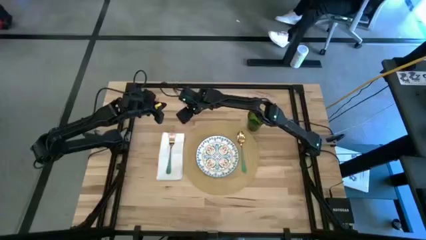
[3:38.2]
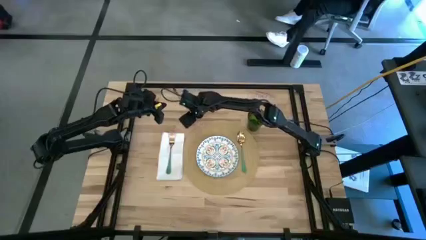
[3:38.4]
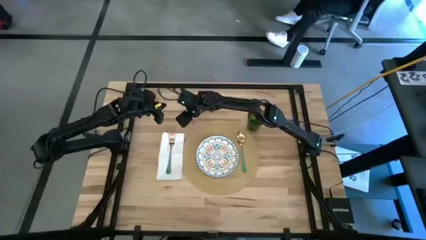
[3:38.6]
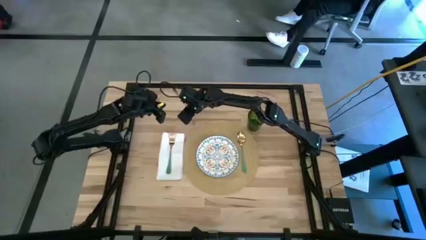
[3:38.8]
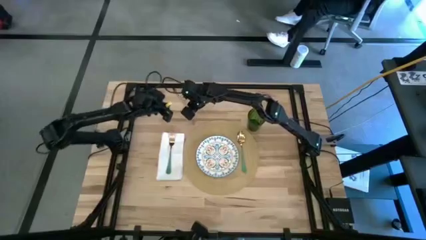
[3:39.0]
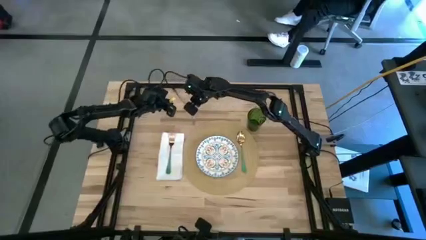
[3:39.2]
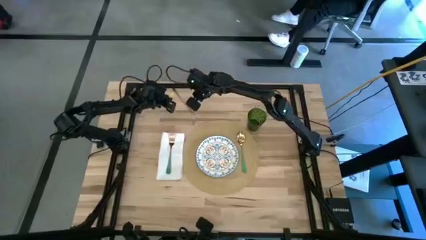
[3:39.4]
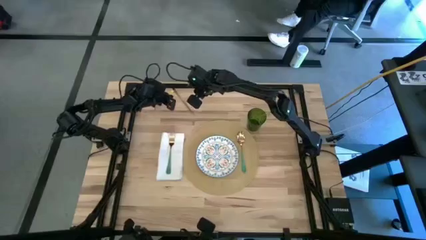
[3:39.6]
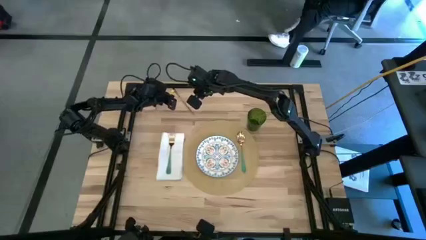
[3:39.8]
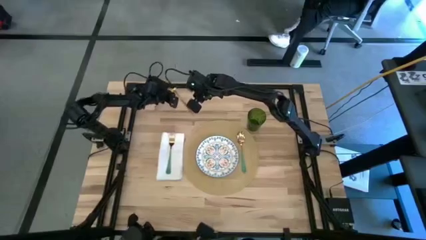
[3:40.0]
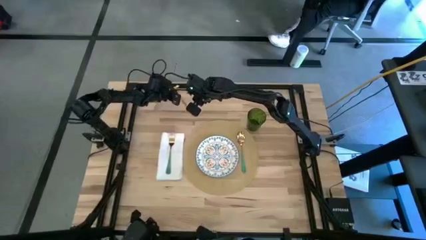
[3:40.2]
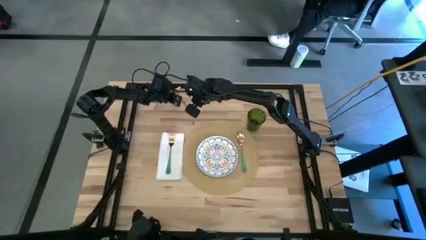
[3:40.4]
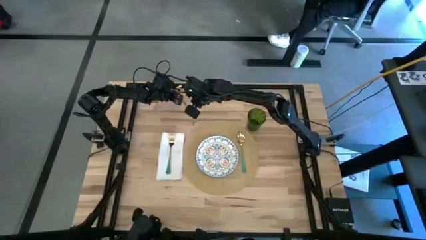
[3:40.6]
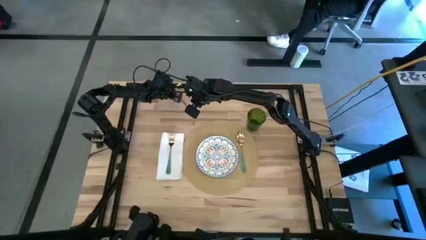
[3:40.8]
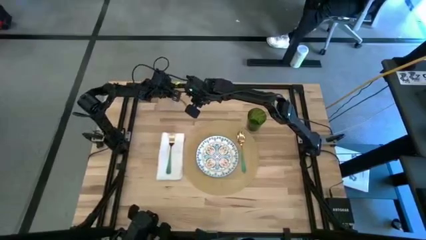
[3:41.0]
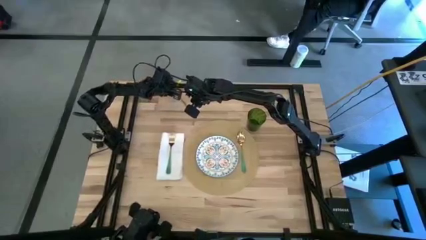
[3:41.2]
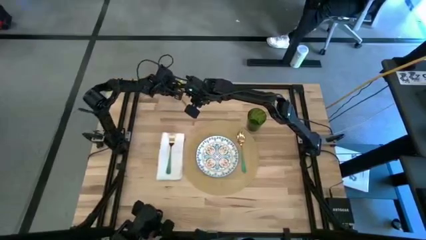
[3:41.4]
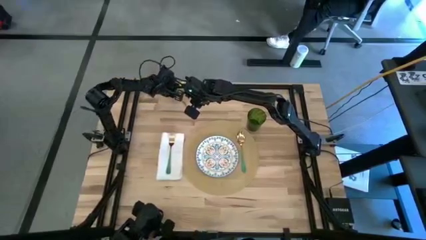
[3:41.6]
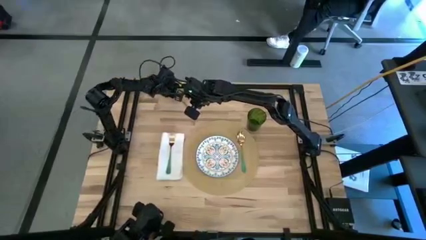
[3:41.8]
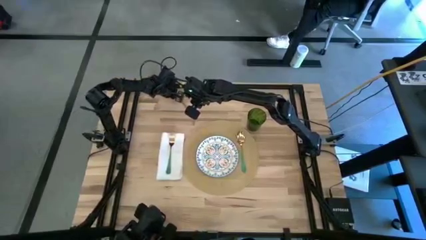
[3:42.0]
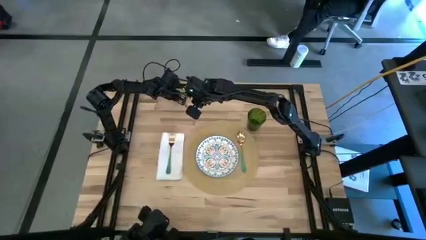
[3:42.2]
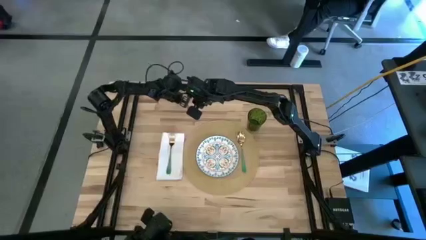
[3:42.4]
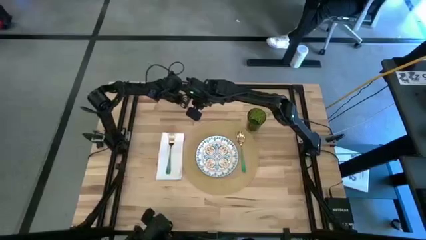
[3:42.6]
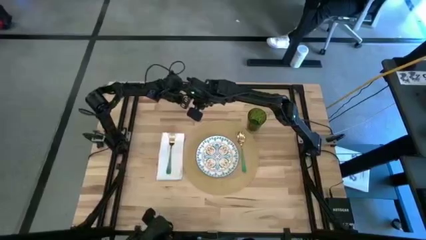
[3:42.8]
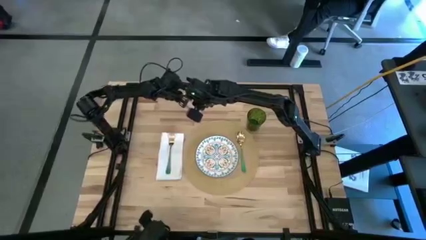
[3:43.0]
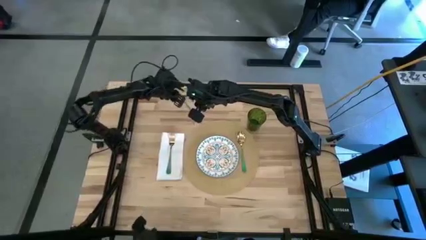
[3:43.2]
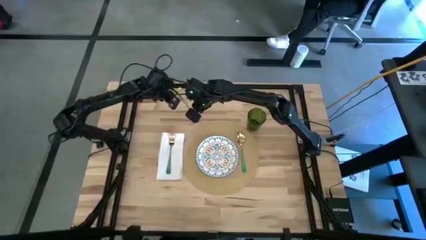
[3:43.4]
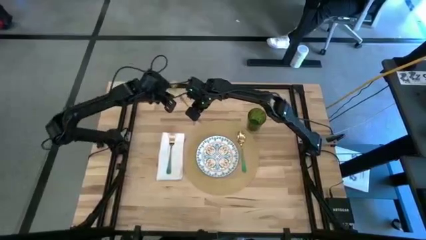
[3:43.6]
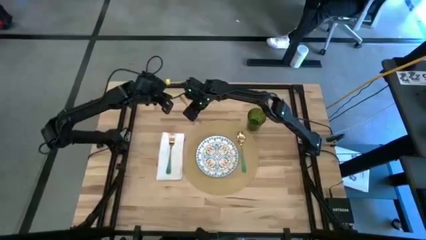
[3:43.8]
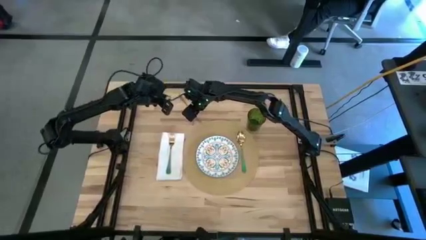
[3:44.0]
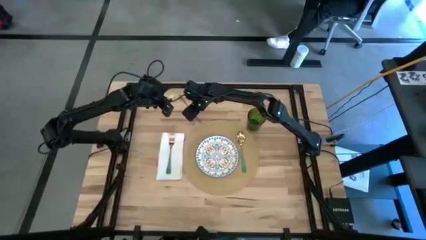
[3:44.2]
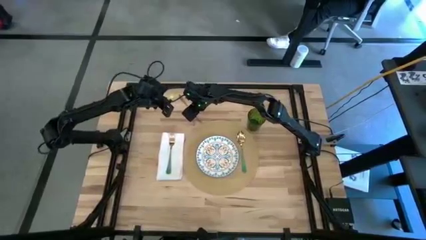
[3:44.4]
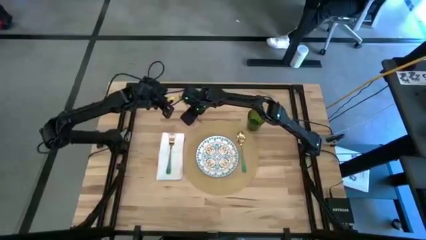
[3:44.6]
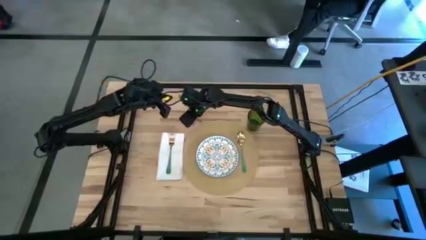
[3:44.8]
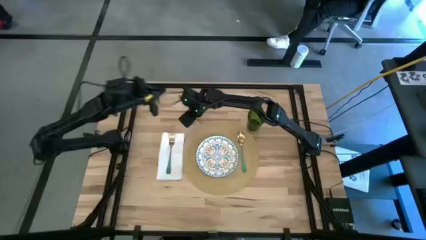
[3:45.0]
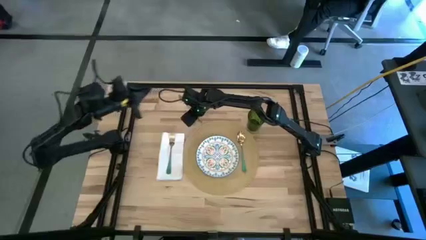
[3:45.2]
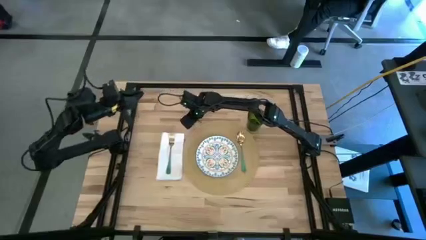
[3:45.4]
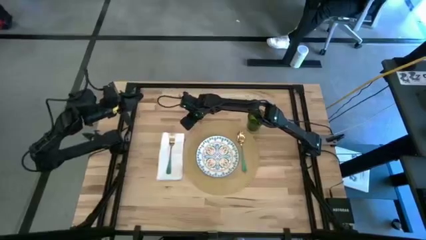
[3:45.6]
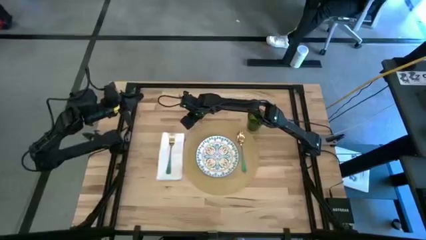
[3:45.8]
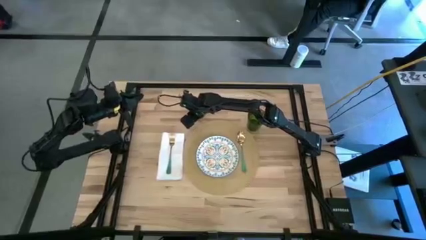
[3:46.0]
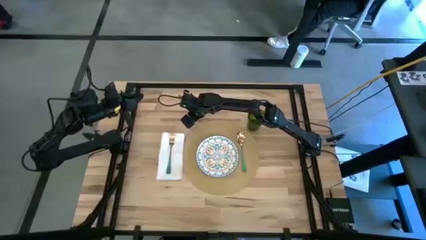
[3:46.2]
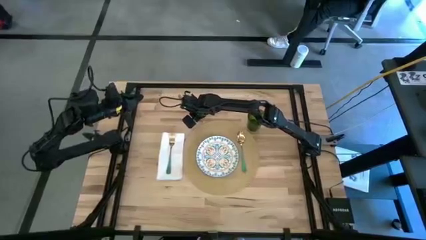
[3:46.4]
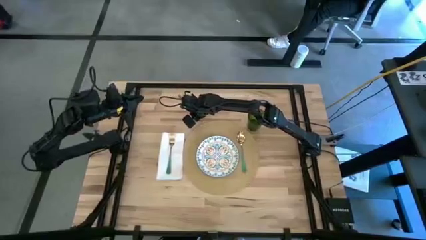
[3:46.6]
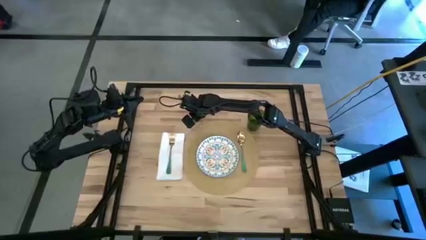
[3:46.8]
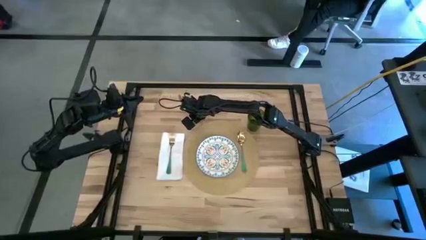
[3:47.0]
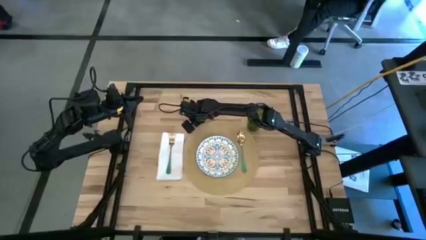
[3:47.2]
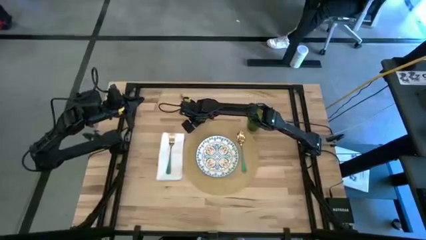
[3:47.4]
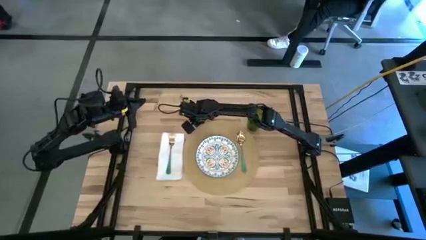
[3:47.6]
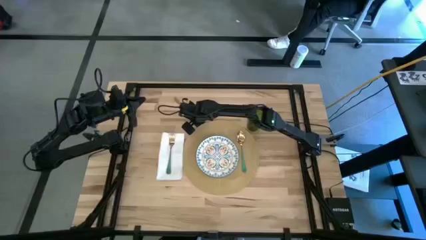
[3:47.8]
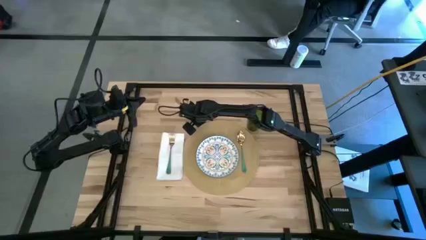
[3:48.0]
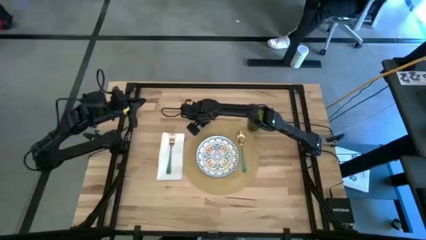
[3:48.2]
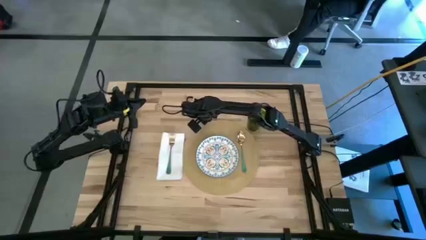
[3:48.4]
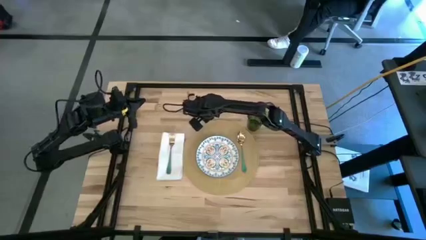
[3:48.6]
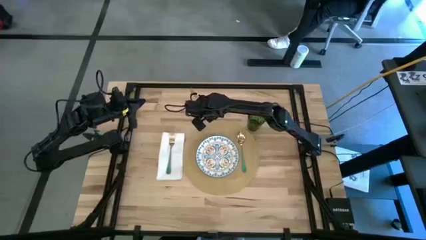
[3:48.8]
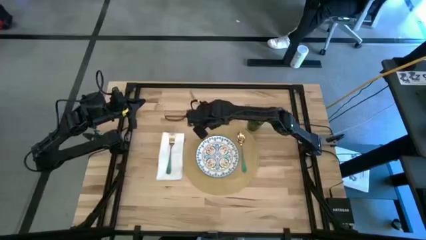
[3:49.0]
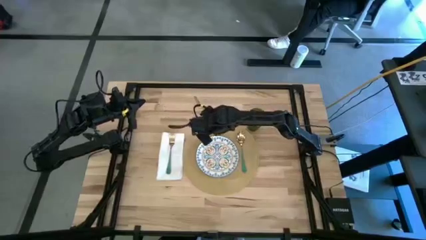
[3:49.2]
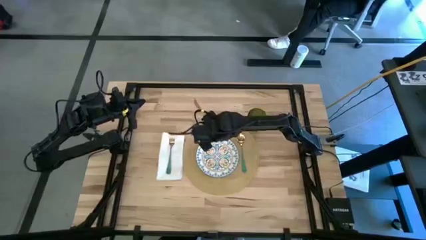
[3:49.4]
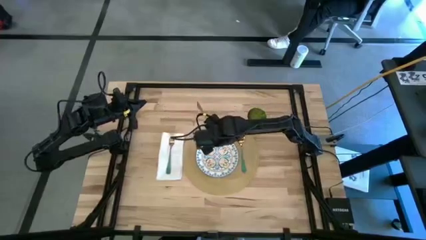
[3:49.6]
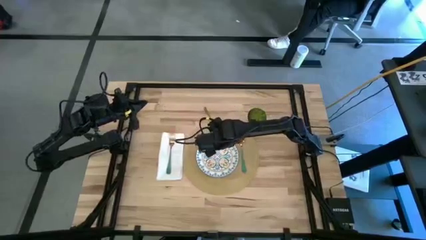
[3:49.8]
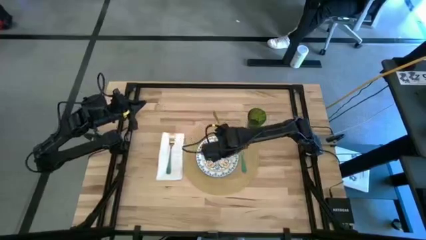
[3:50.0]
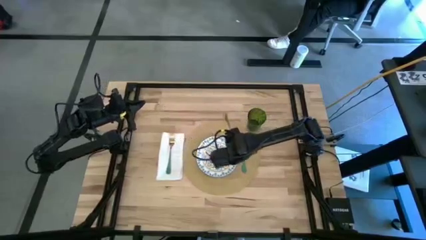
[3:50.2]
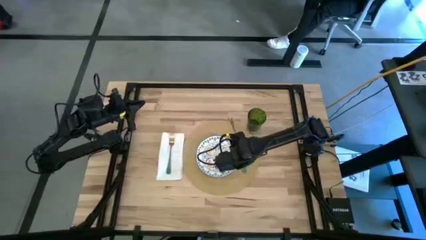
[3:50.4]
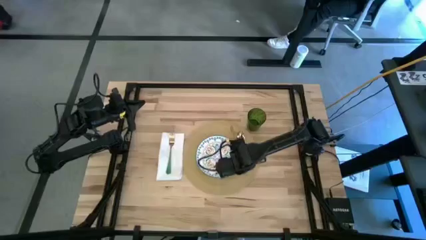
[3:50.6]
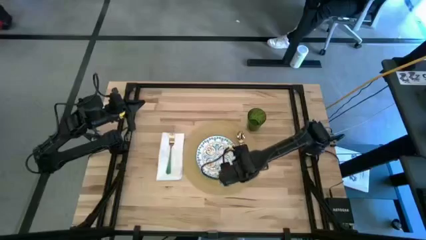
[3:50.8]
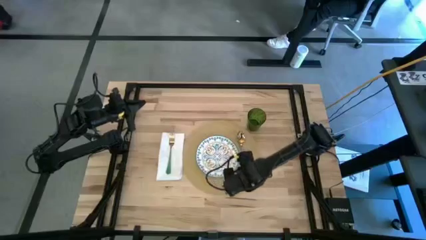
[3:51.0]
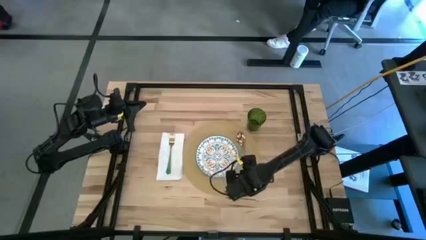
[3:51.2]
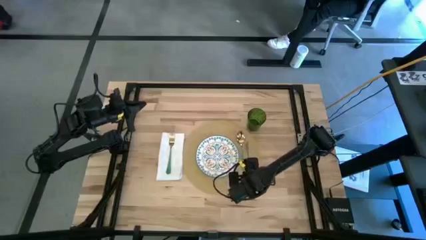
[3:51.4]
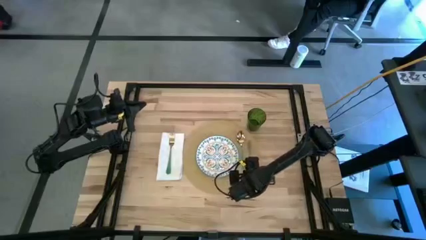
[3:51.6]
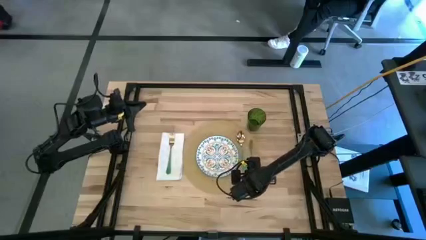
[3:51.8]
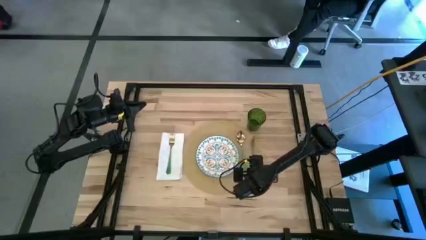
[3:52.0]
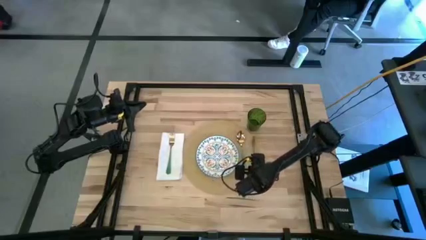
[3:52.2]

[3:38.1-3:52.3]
Task: Set table place
Put the gold table knife to the right of the green spoon on the brown place mat
